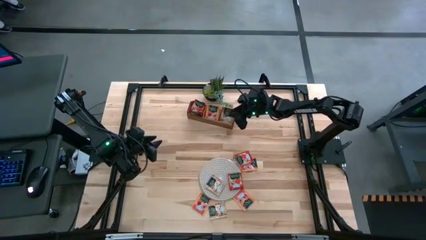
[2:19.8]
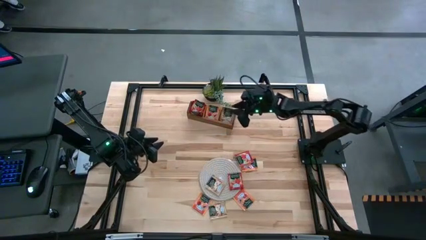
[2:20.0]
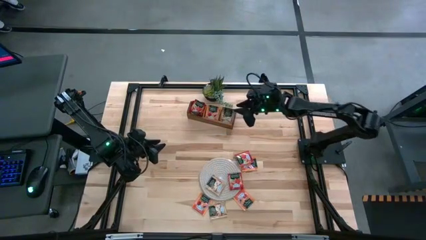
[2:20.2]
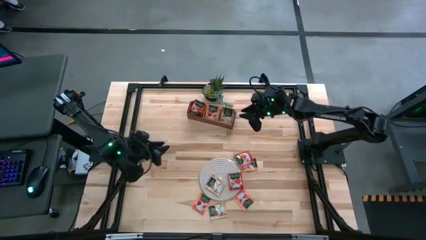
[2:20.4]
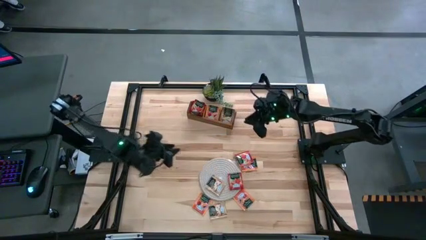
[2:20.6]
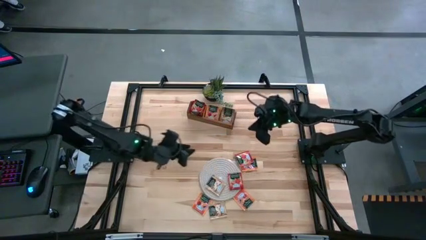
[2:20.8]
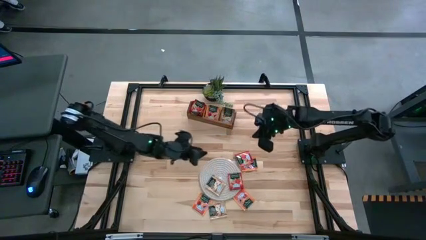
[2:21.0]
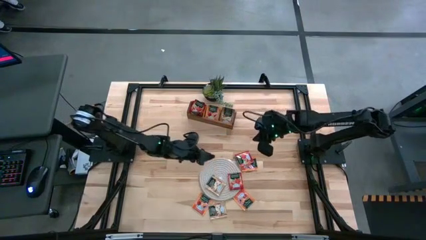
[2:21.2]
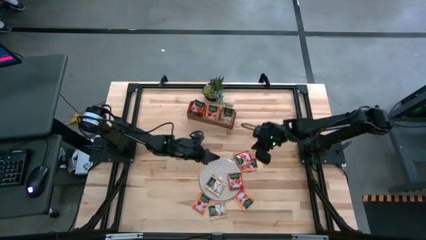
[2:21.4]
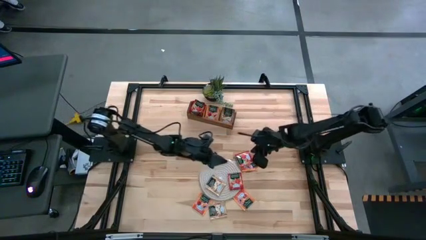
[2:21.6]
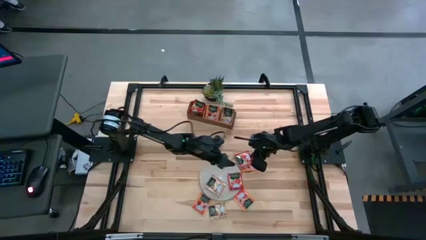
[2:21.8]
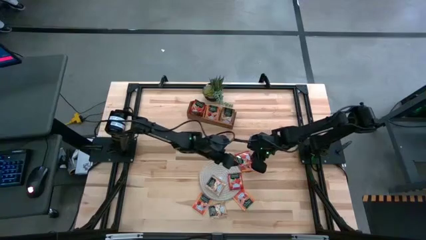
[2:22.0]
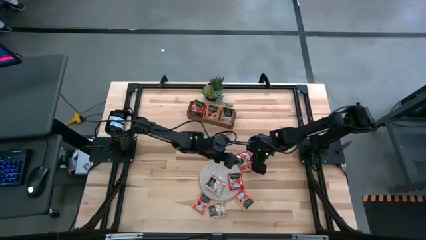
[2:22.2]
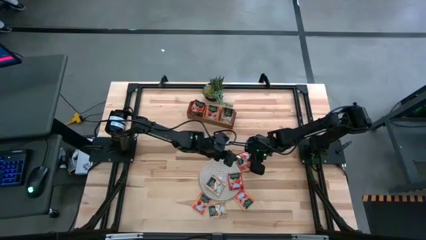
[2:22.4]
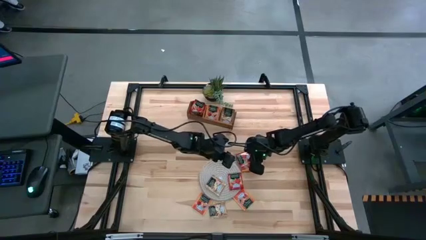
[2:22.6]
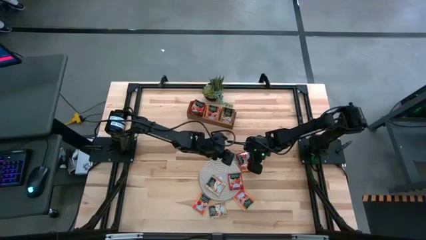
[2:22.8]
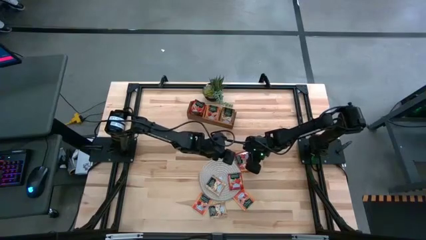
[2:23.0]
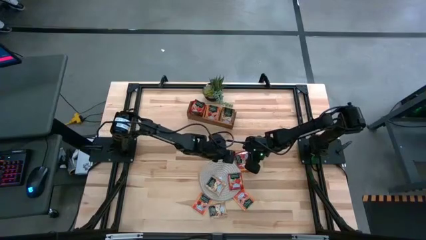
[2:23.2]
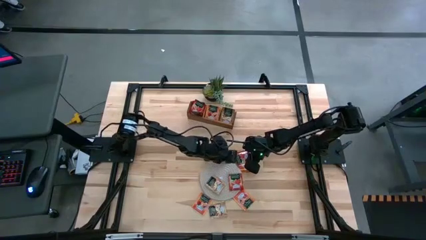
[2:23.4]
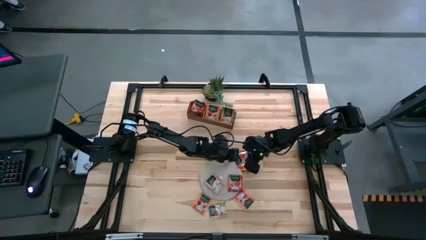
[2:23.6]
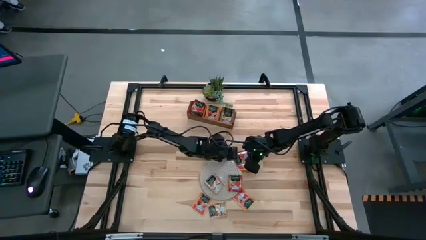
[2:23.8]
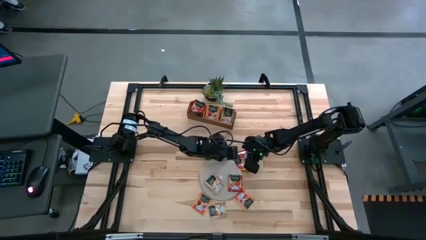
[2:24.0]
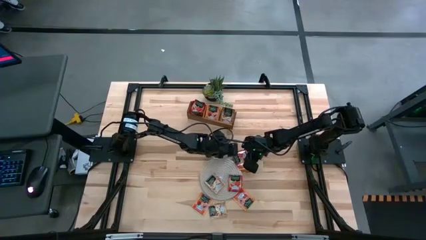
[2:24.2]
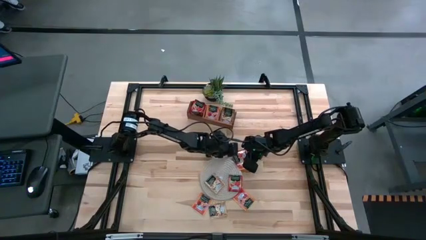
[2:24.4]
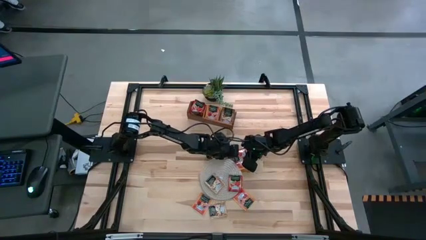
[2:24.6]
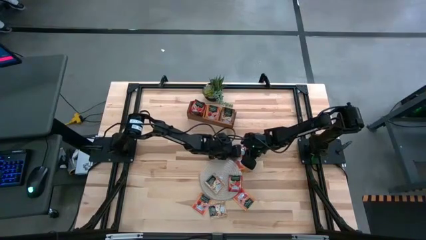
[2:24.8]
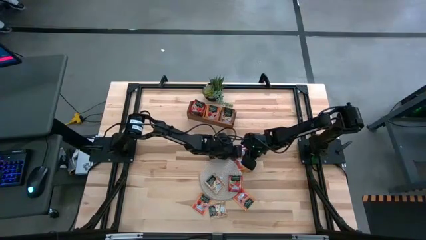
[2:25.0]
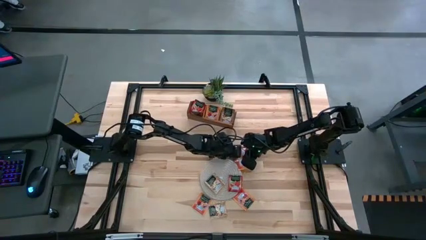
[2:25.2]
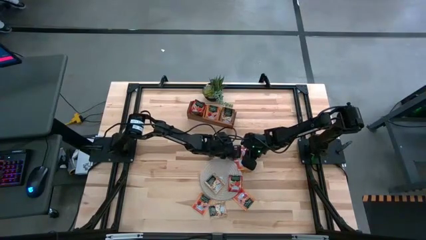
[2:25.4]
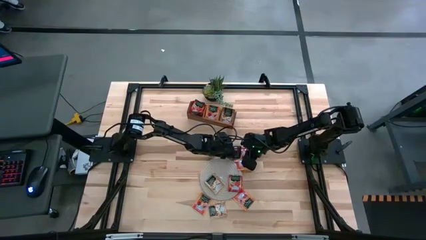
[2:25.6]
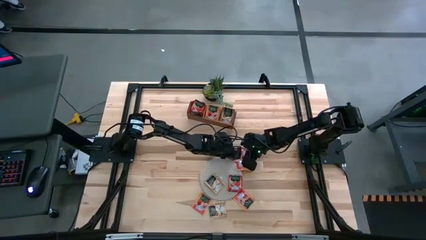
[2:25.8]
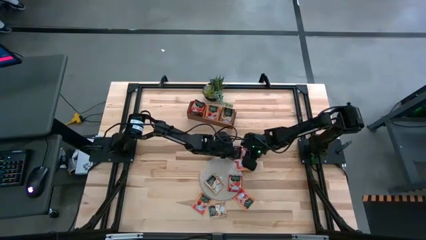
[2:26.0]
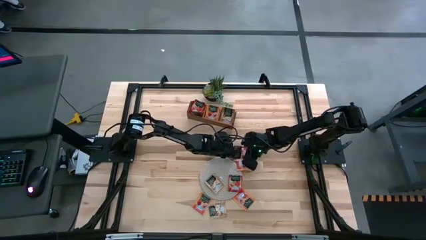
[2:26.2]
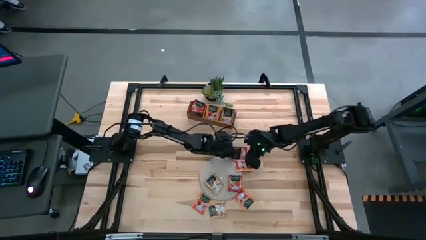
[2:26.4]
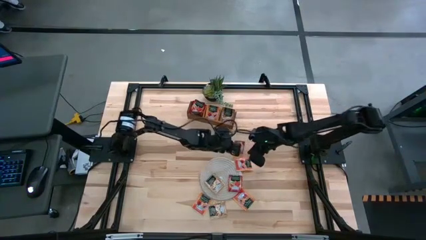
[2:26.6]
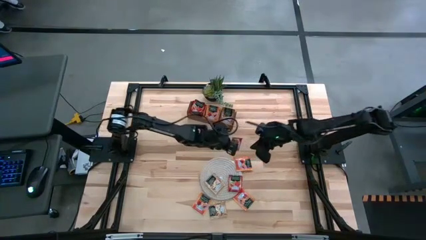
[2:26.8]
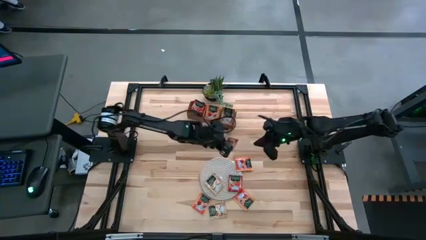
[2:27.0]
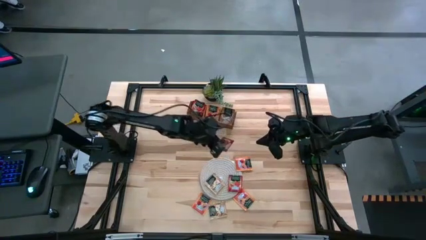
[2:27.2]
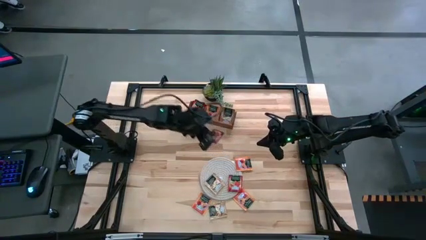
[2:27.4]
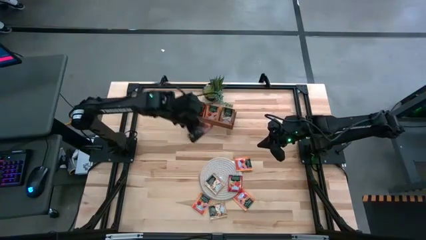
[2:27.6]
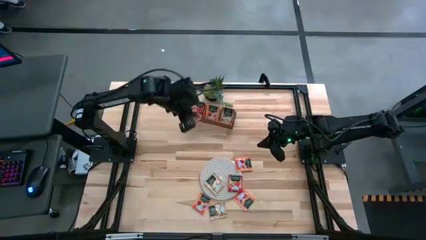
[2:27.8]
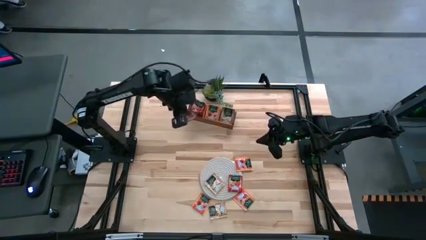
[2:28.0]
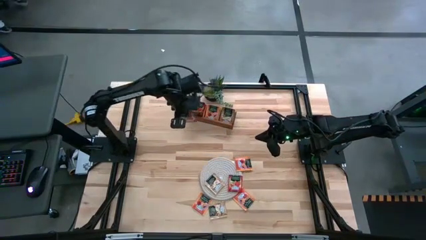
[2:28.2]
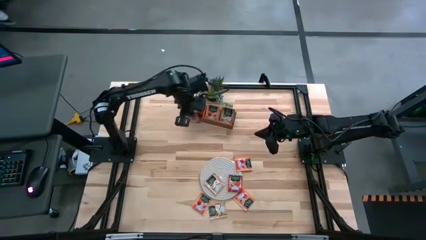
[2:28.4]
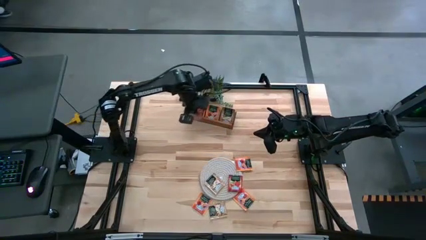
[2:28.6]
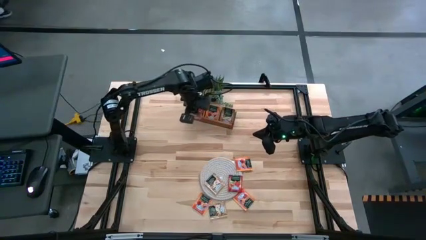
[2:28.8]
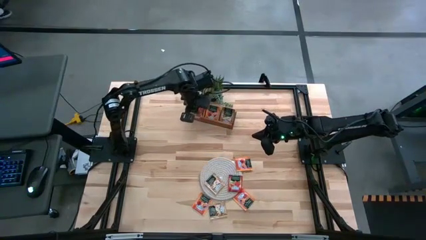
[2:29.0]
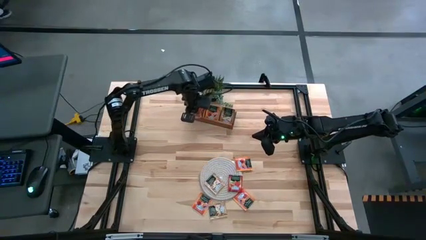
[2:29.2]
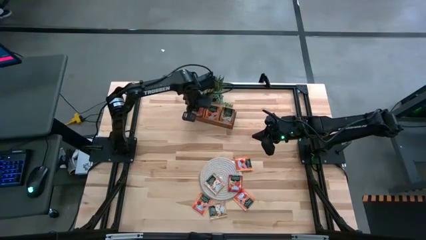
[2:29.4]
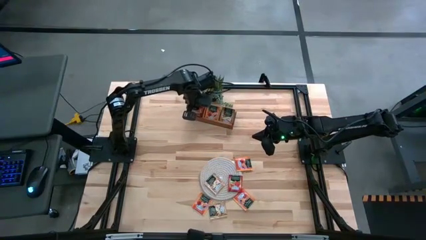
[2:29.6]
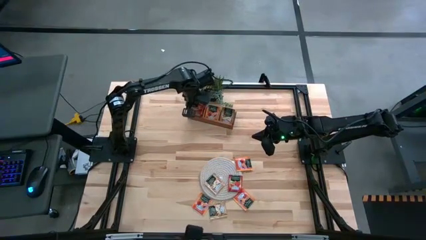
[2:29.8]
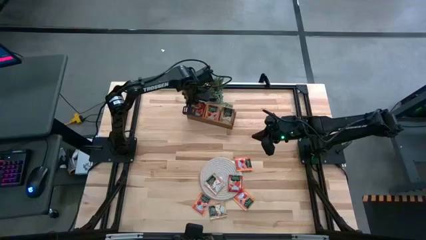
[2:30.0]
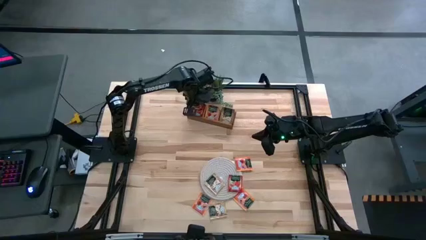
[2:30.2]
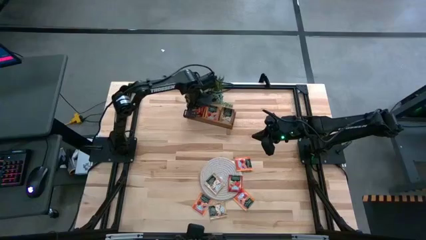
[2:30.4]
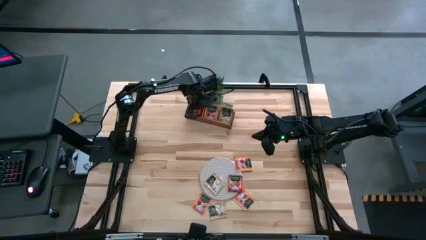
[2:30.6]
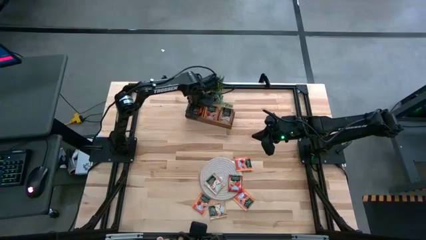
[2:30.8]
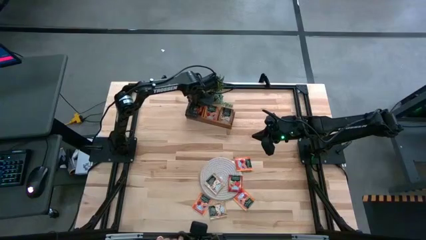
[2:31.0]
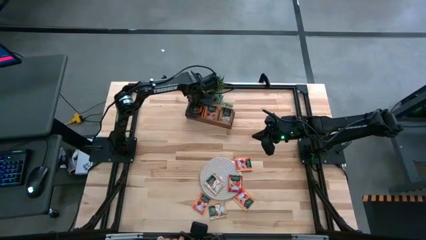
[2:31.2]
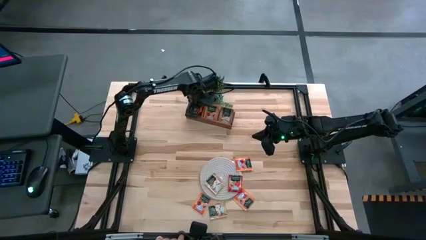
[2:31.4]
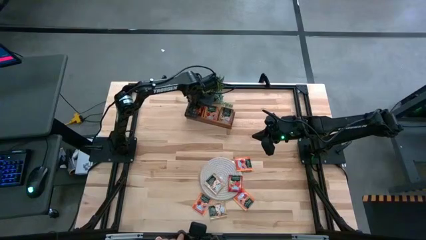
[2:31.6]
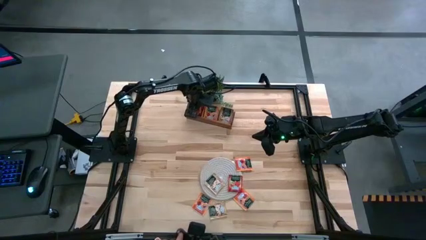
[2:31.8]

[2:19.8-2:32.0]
Task: Pick & Place Tea
Put the red tea bag into the left section of the wooden organizer

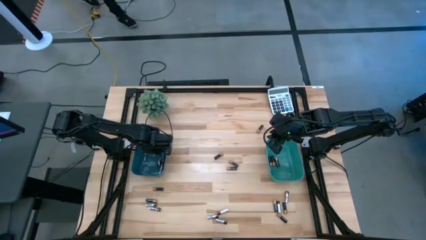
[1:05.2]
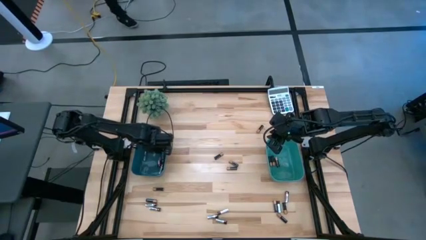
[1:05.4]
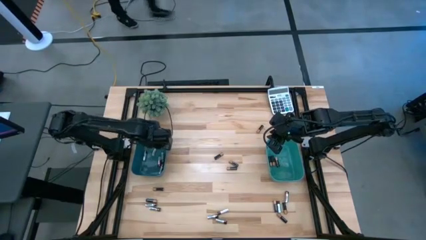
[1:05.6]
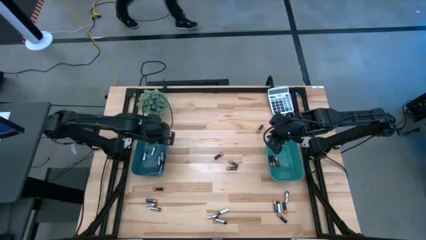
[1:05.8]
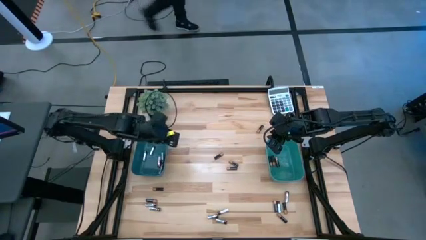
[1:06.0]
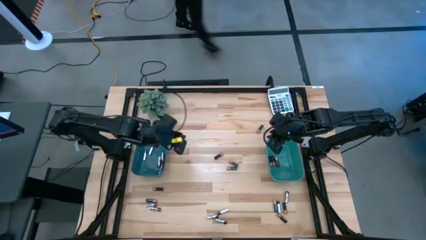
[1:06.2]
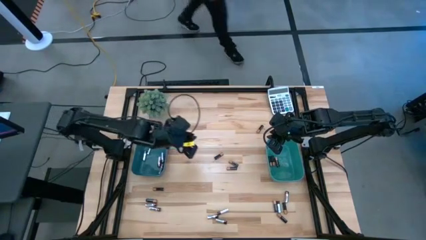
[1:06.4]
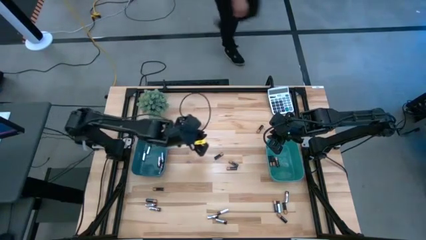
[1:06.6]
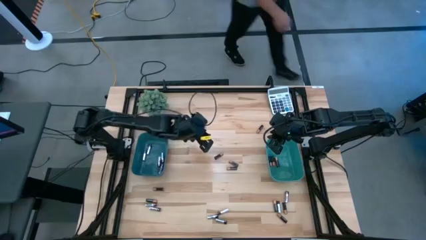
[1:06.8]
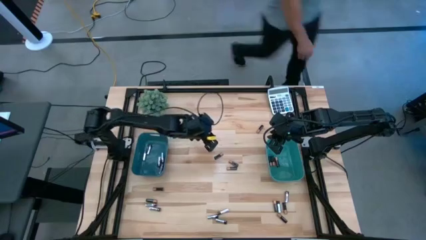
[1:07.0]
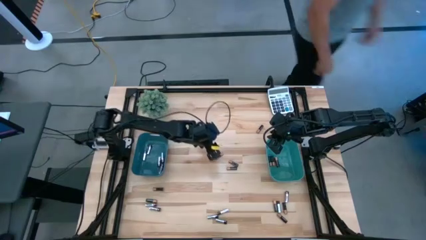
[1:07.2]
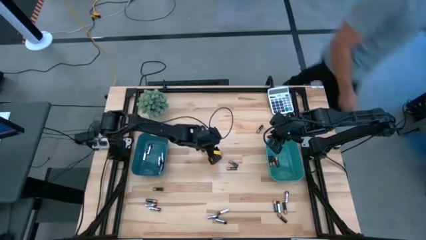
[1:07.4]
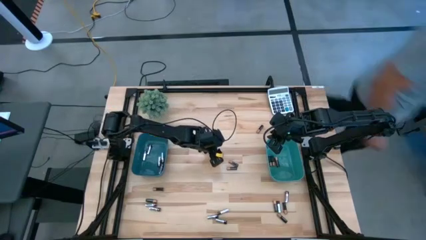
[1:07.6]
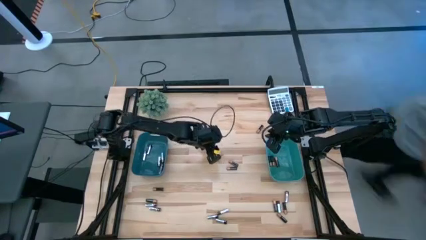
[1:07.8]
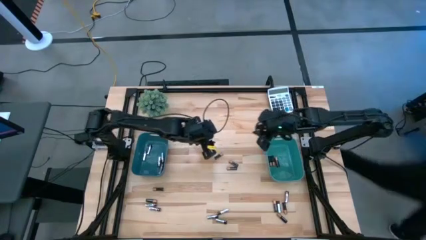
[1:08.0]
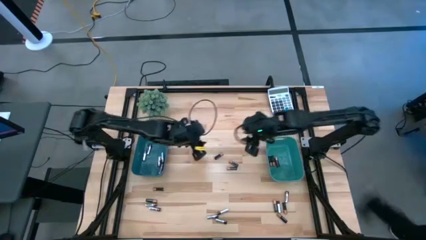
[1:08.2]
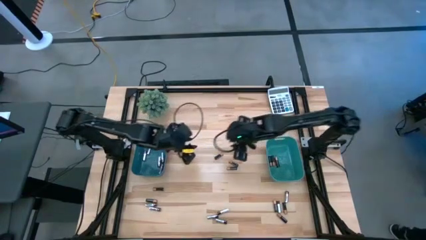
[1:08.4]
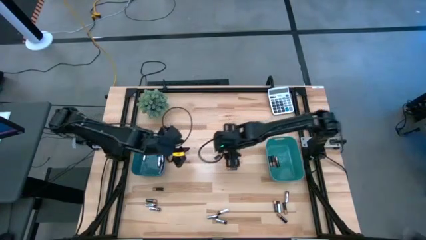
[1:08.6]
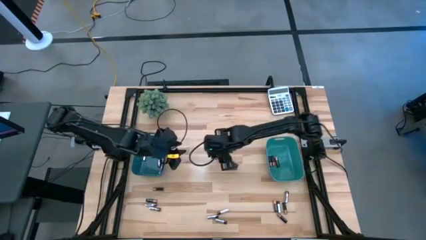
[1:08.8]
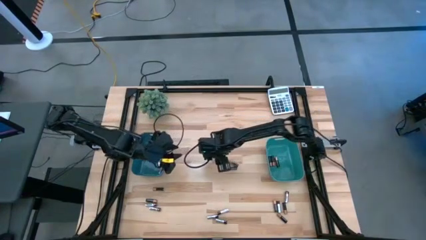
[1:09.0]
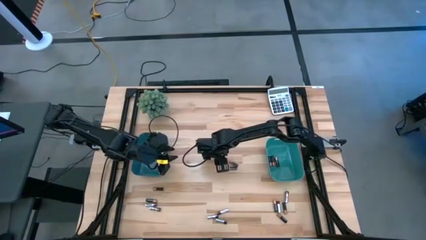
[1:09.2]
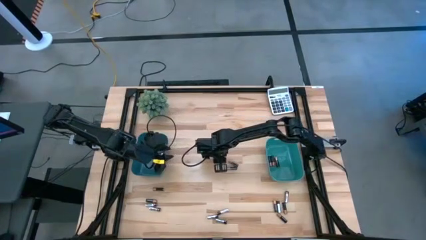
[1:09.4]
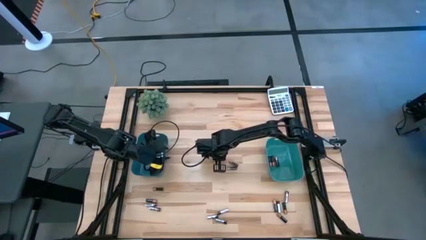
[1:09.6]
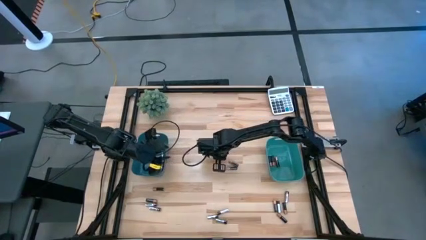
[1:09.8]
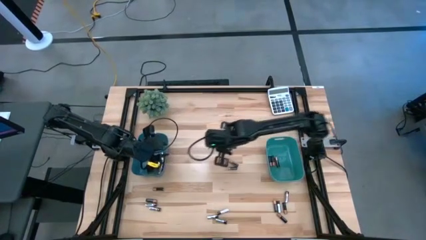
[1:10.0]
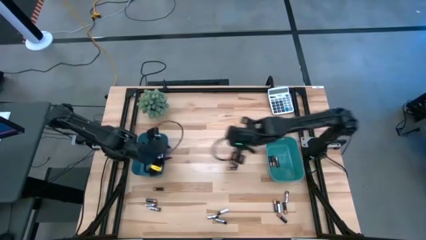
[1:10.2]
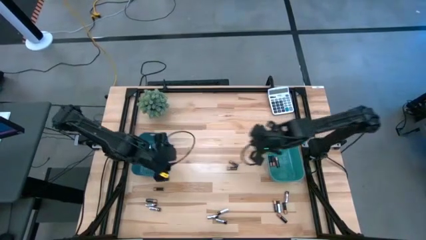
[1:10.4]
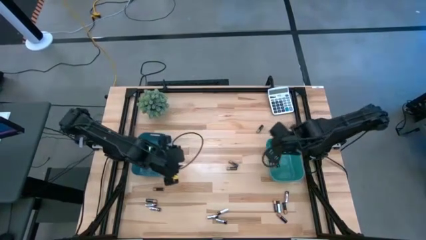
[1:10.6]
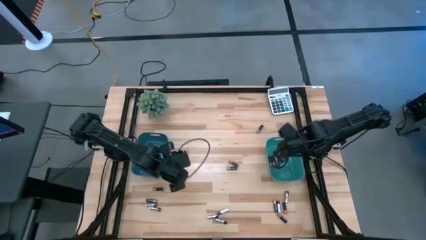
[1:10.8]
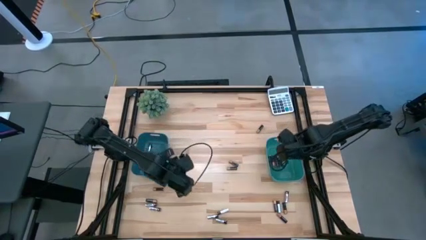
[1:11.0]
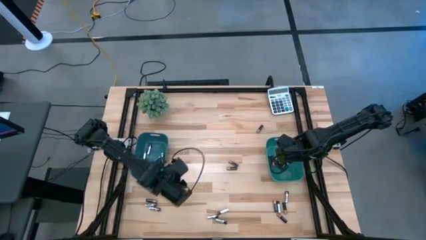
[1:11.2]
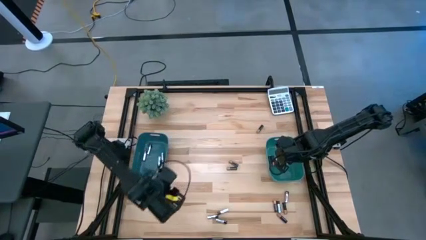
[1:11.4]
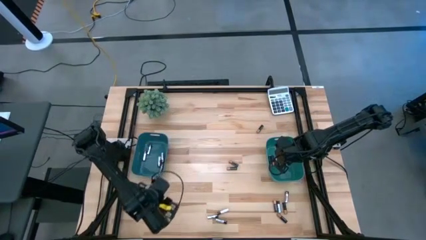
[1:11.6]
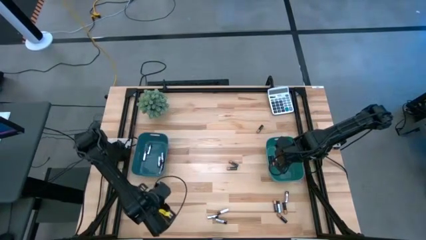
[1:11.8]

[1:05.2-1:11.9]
Task: Sort batteries
Put the black battery into the green bin
